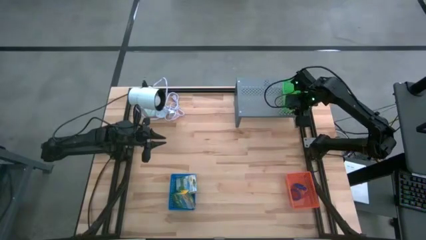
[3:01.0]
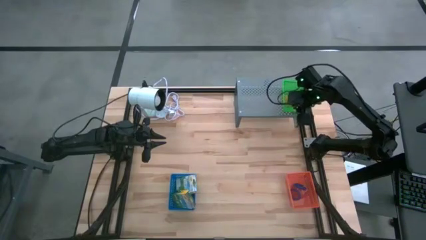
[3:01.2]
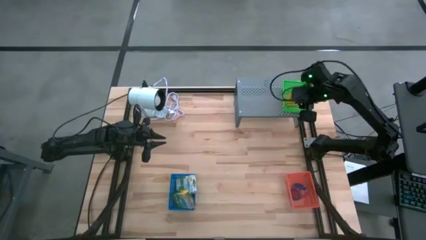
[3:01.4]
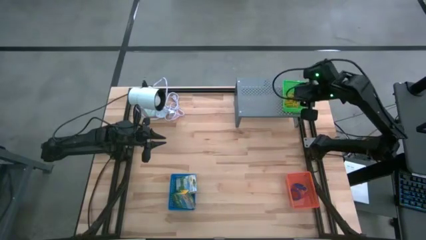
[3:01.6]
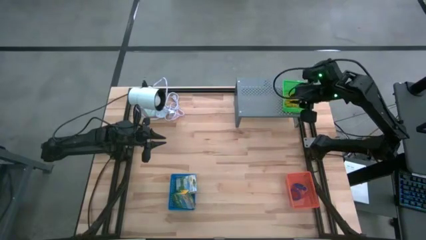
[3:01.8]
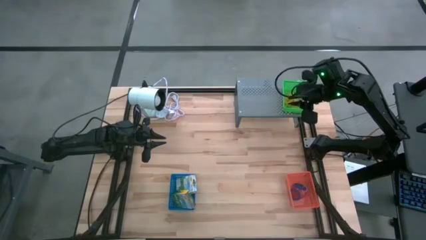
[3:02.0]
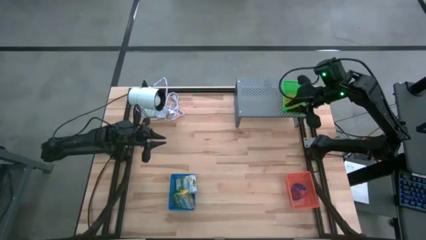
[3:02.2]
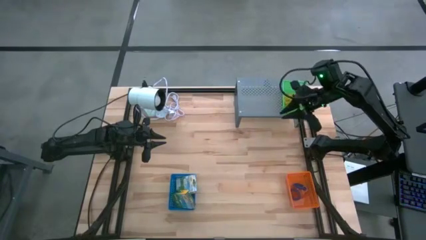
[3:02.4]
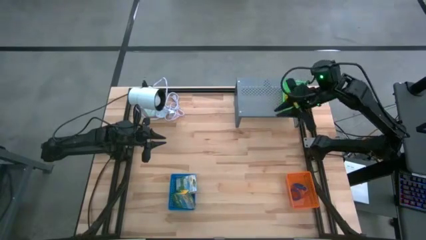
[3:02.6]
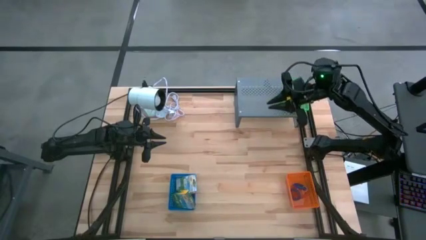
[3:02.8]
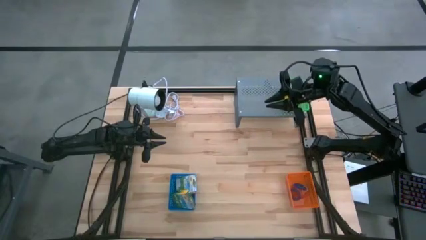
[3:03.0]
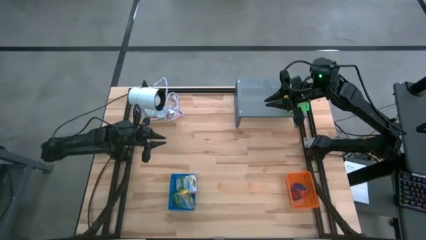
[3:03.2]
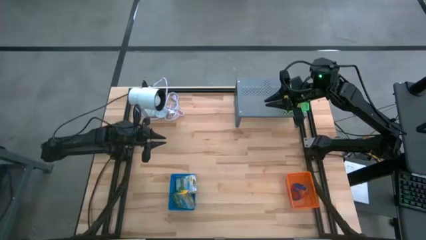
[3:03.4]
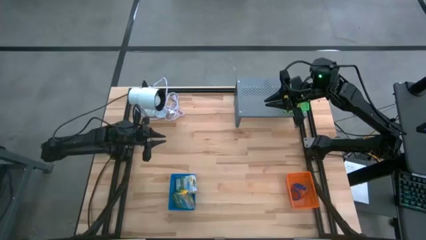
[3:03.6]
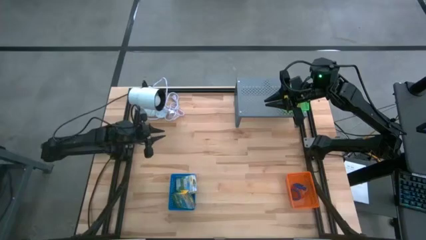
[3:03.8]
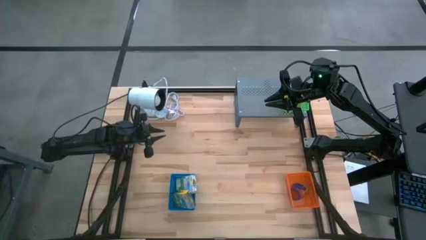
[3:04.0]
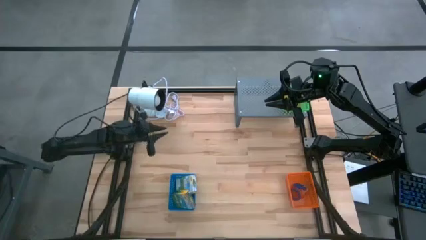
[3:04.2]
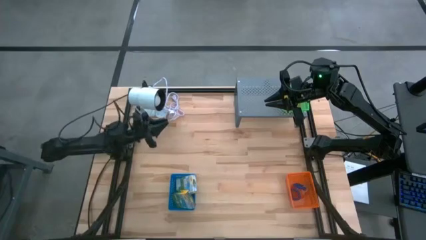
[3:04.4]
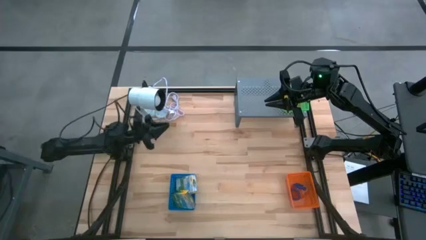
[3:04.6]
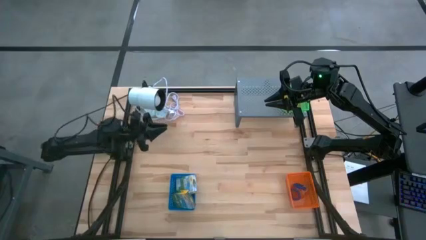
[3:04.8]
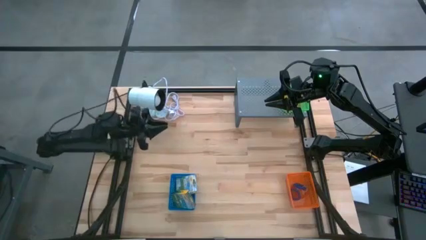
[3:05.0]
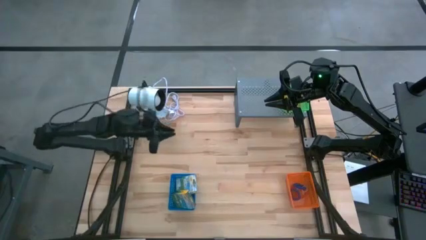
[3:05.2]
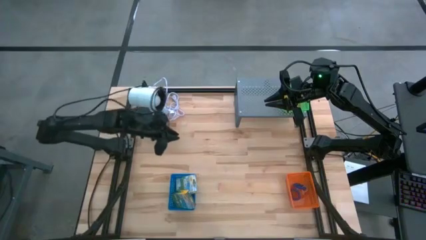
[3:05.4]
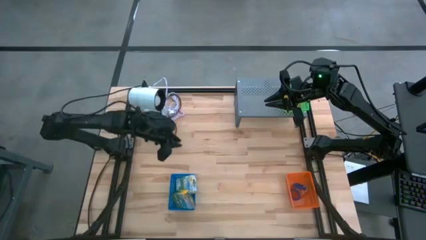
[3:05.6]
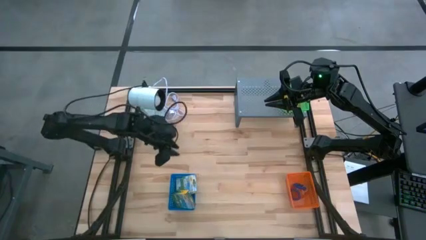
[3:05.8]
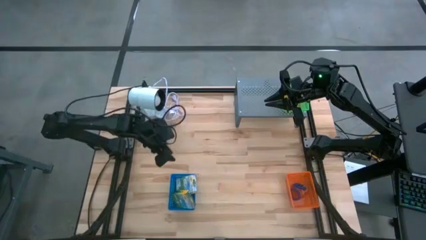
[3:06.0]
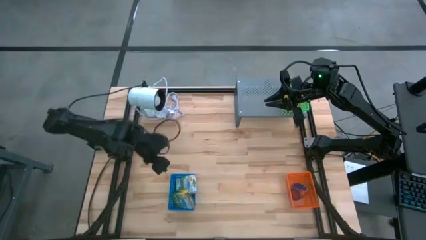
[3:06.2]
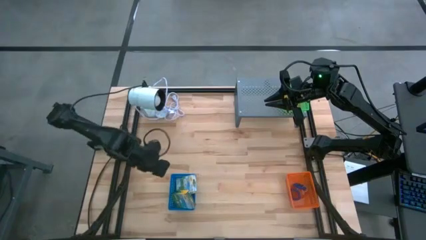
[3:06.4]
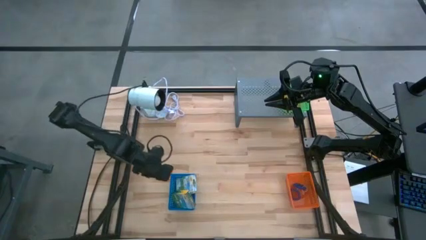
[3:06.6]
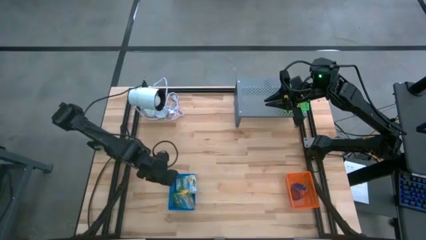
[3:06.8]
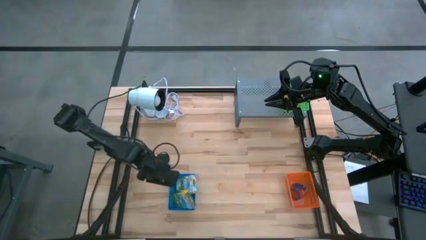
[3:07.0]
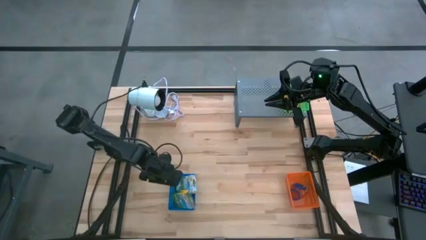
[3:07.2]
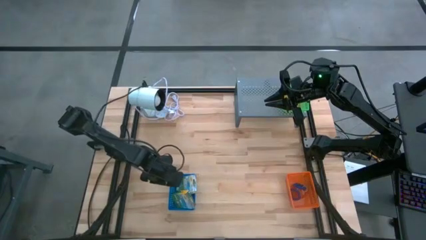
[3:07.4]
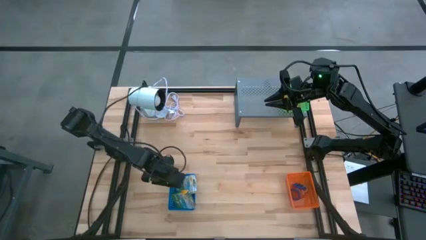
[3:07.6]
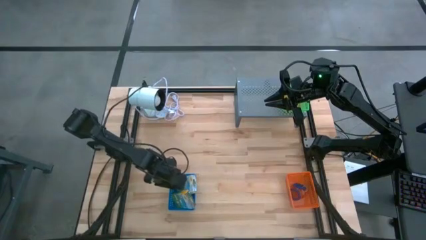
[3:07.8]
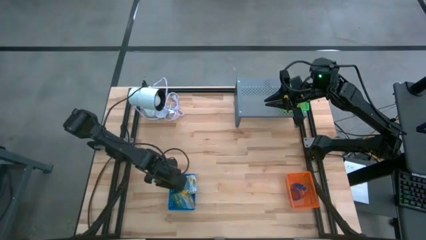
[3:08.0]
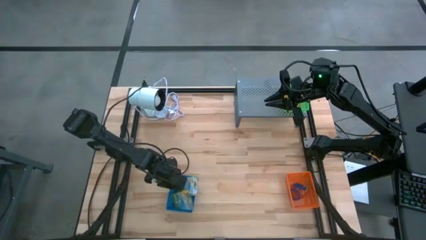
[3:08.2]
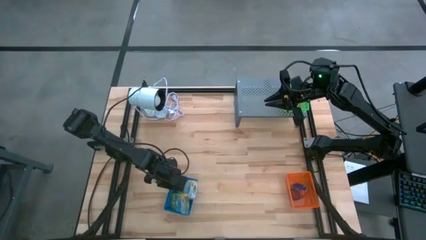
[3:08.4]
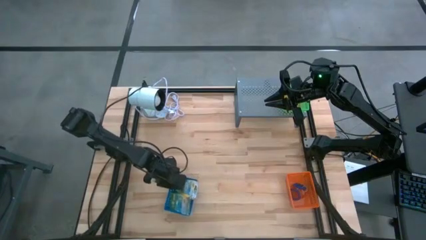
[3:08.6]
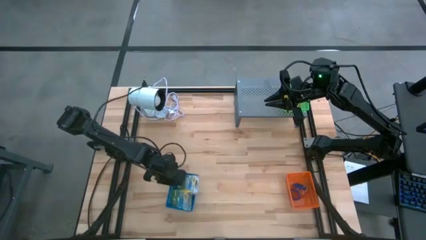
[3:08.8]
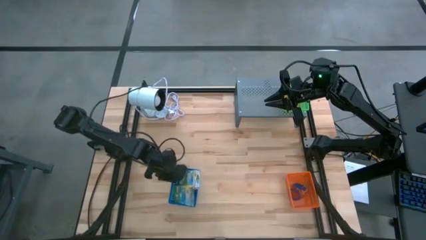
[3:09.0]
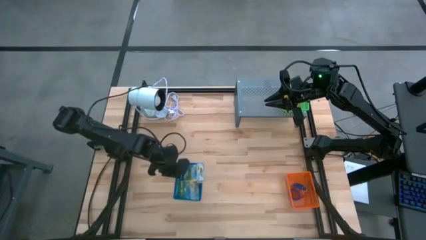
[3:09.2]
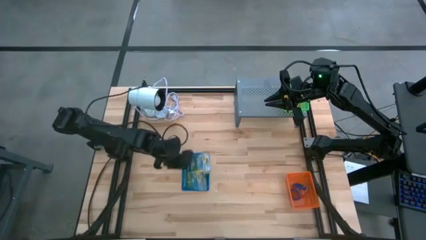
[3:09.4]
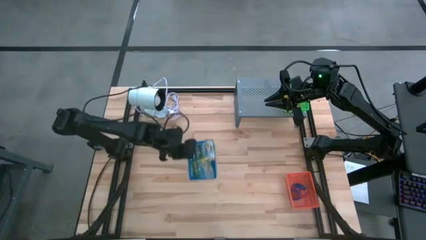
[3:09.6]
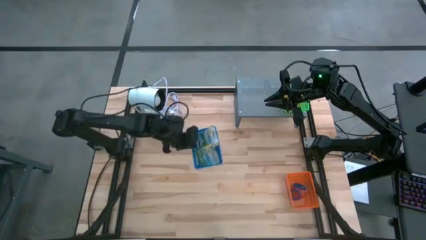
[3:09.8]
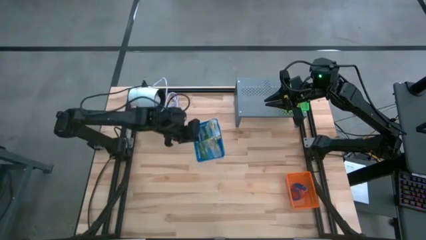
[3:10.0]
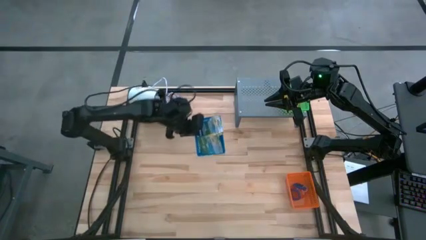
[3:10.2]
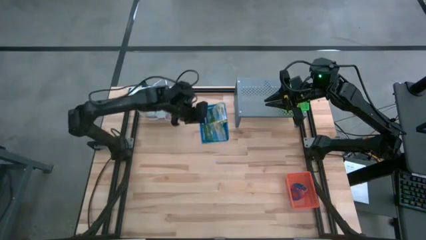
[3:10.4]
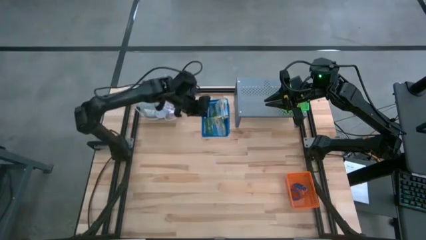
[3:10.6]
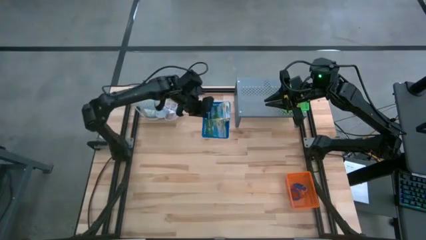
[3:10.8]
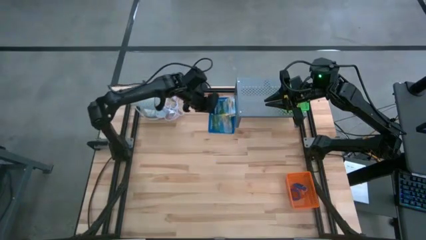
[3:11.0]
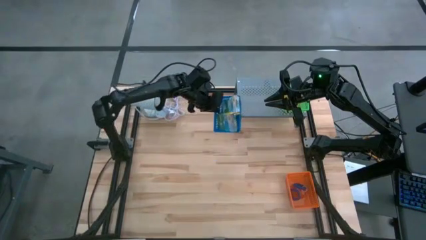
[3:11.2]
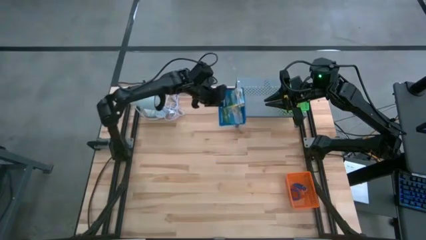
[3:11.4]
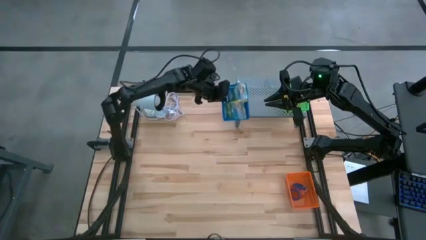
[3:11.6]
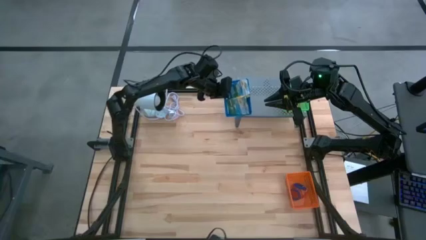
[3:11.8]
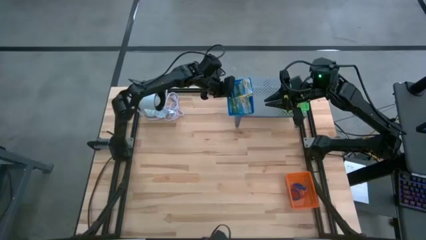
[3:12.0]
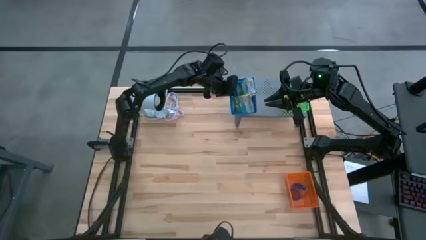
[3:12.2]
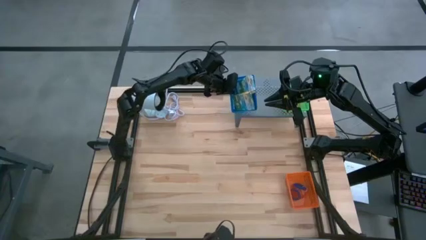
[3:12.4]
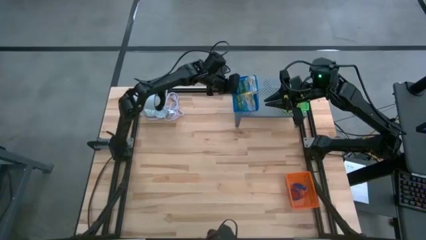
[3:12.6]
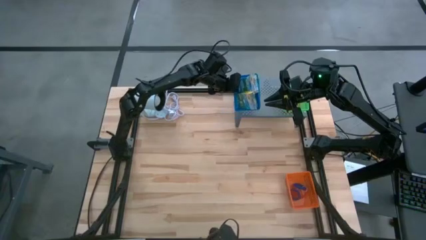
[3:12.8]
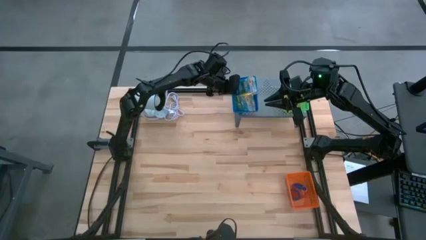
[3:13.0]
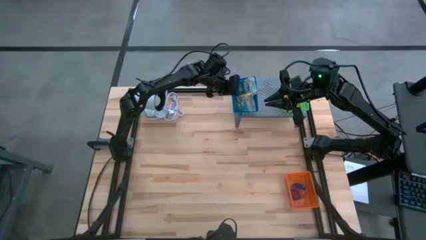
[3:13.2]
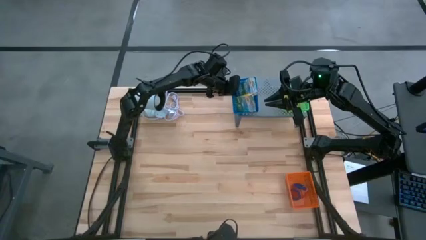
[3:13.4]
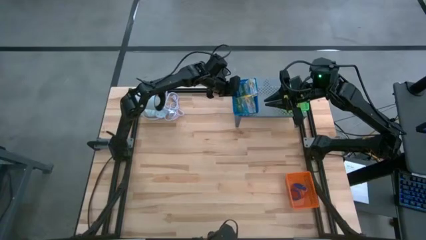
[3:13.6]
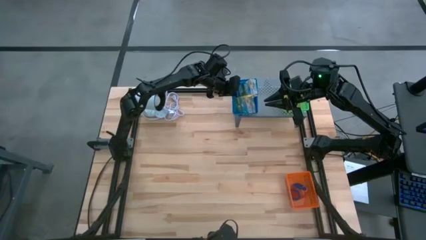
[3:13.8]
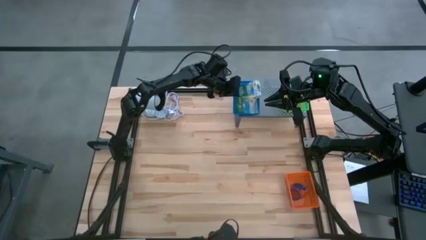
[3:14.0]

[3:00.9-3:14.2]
Task: Pick & Place Office Desk Supplies
Put the blue bin on the shelf

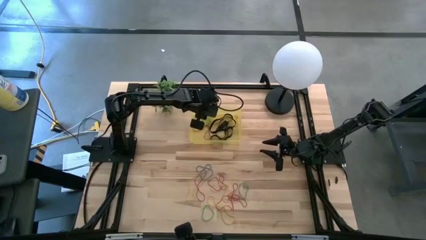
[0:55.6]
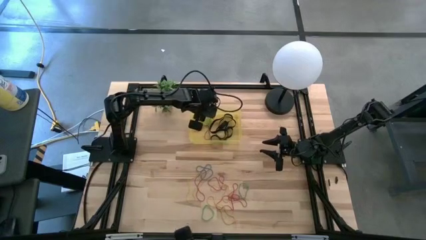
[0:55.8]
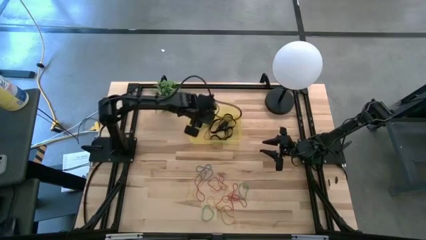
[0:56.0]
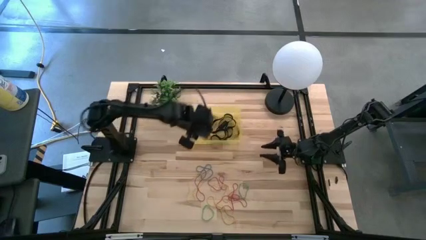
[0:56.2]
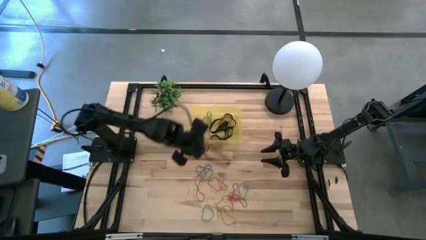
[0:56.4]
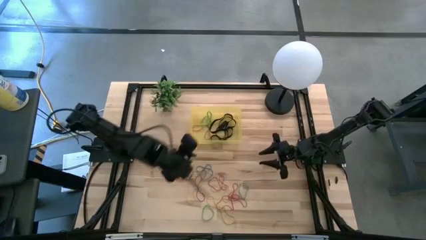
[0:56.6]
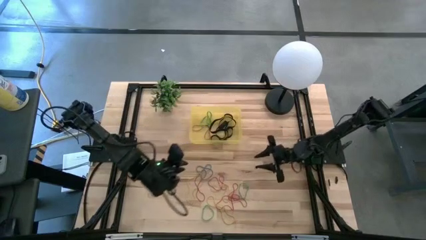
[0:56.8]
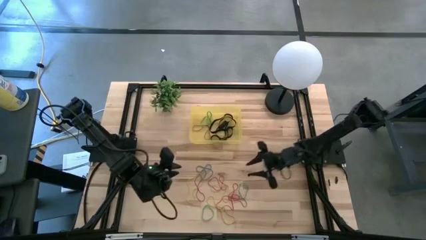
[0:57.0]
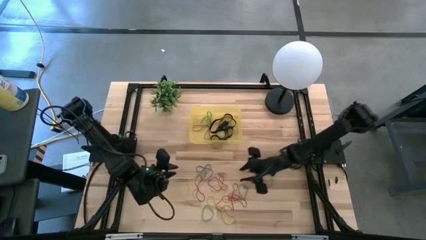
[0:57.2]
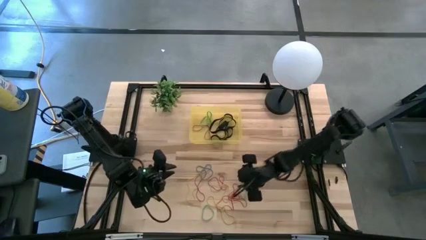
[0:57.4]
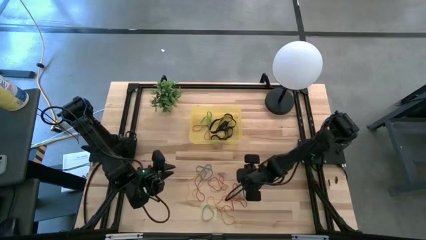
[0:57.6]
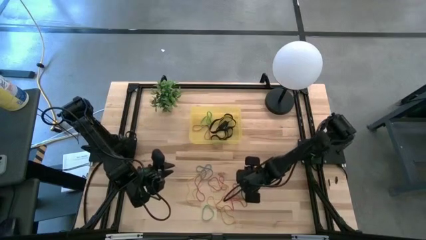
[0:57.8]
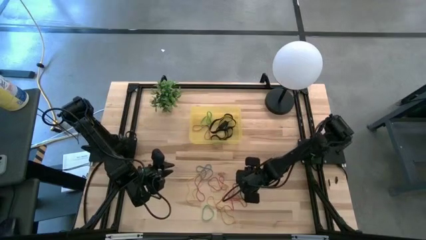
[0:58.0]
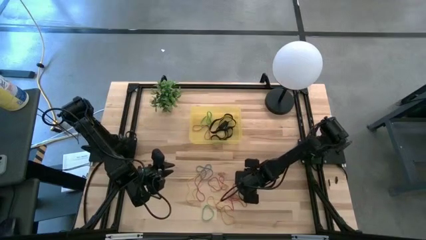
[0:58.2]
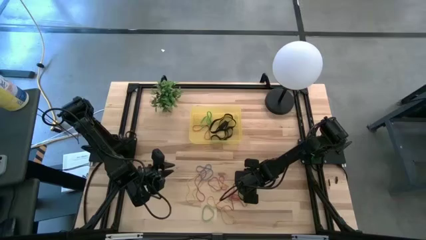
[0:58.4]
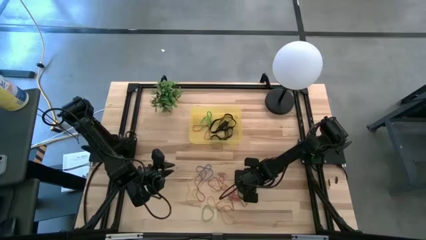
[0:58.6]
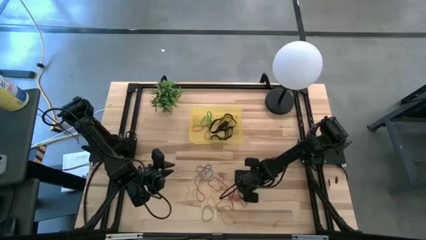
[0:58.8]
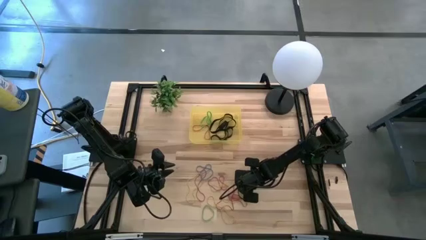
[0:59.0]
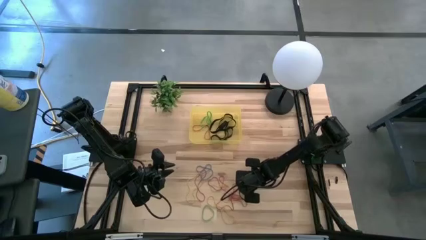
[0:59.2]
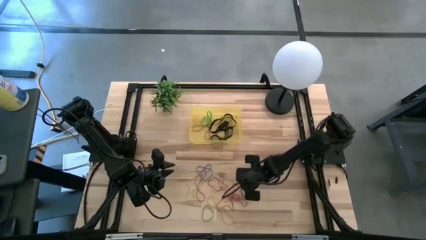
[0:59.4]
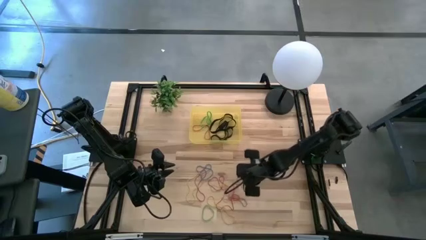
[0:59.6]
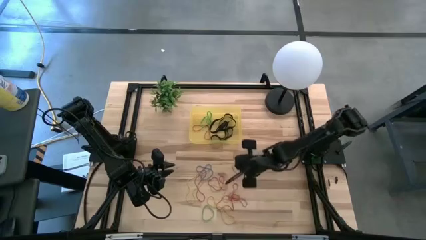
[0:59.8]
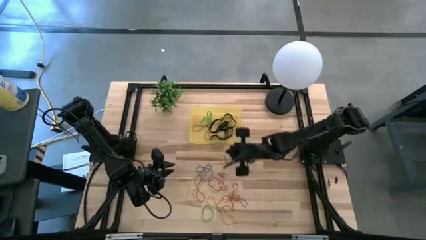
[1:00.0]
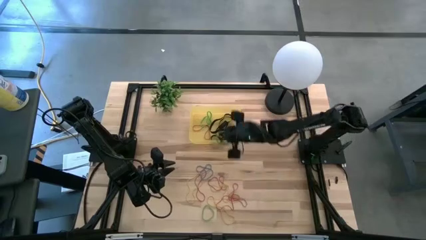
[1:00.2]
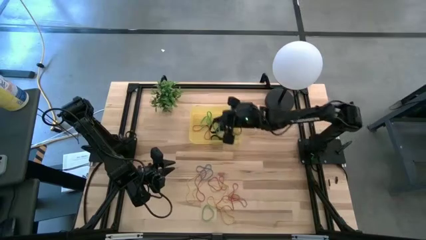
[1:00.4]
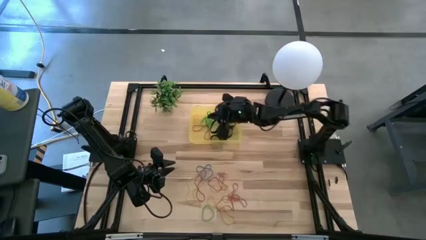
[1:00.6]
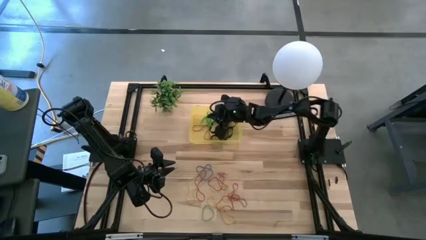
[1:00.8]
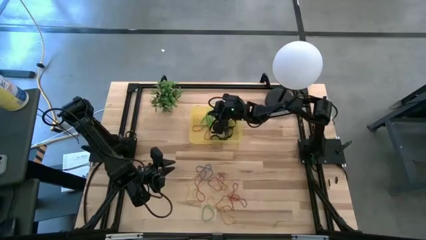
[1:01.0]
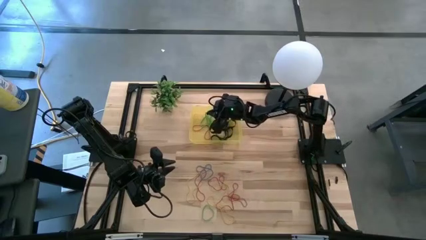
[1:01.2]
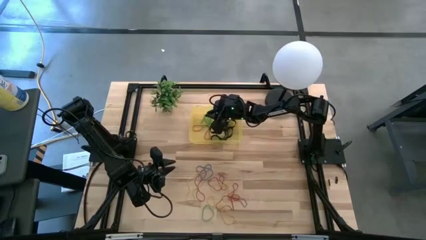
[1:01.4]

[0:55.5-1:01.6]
Task: Pick and place rubber bands into bin
Put the green rubber band into the yellow bin
